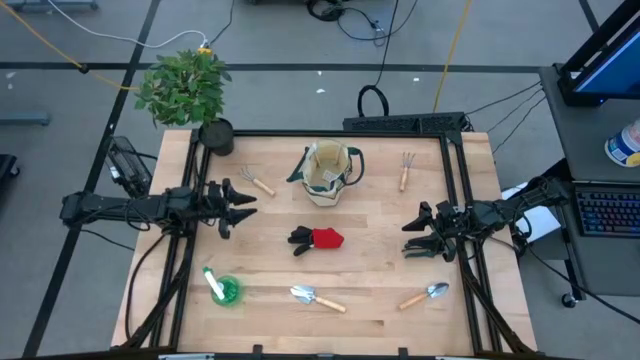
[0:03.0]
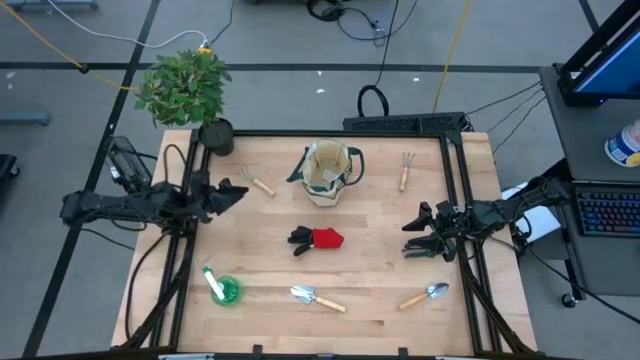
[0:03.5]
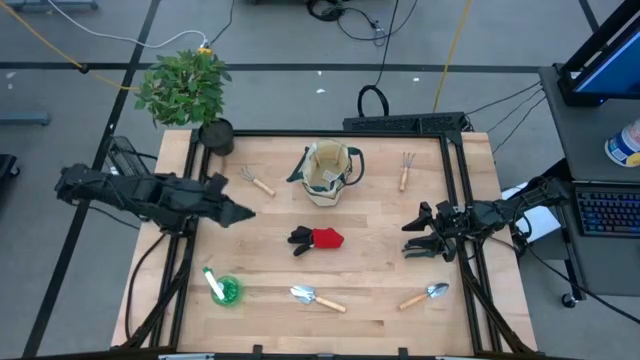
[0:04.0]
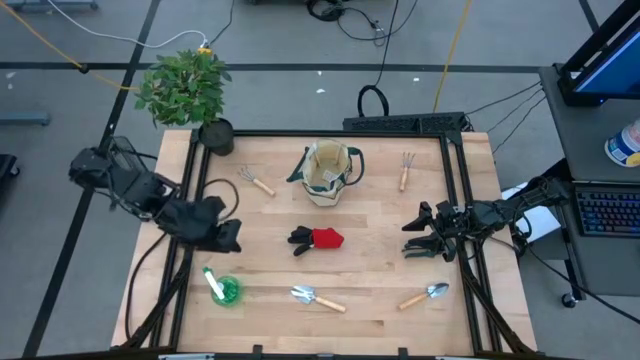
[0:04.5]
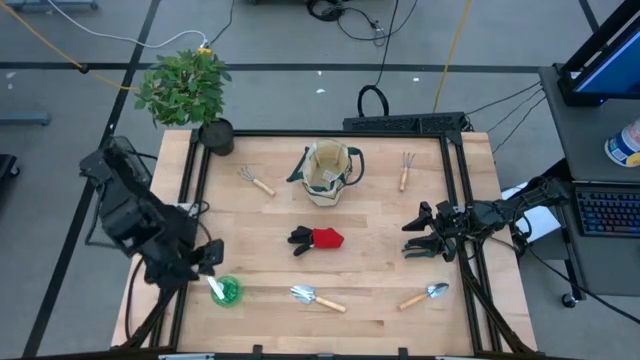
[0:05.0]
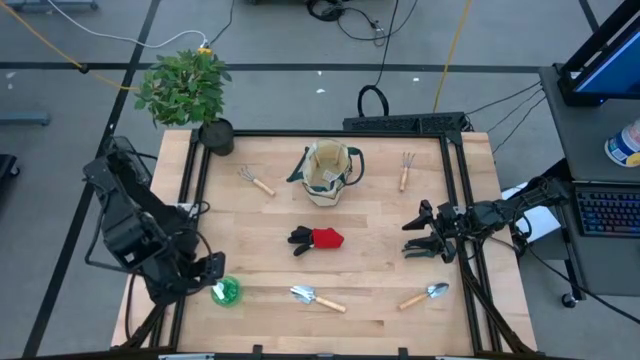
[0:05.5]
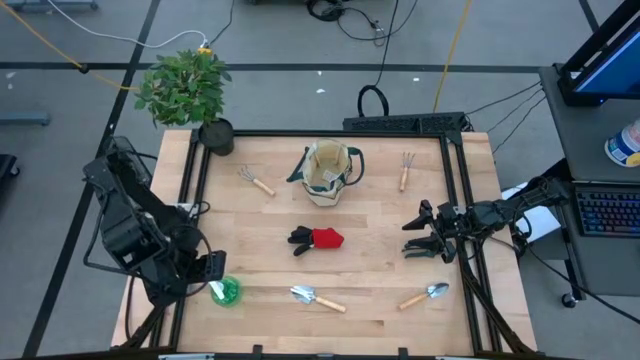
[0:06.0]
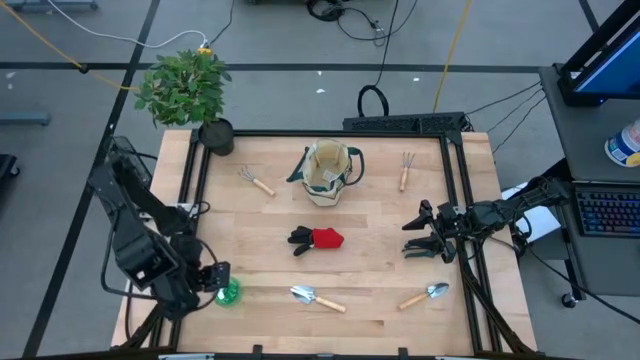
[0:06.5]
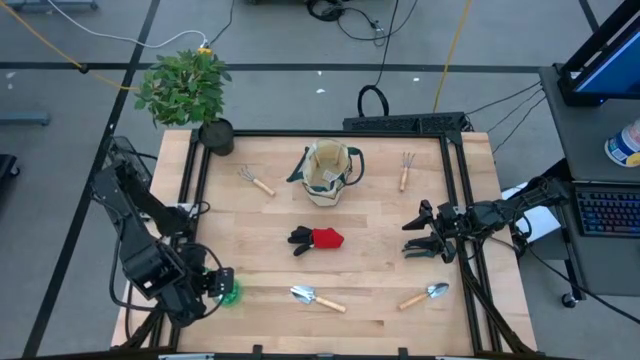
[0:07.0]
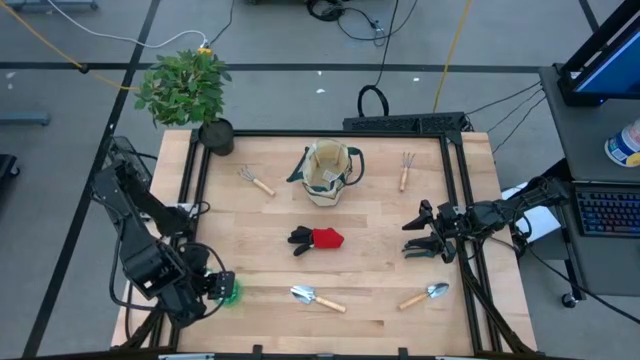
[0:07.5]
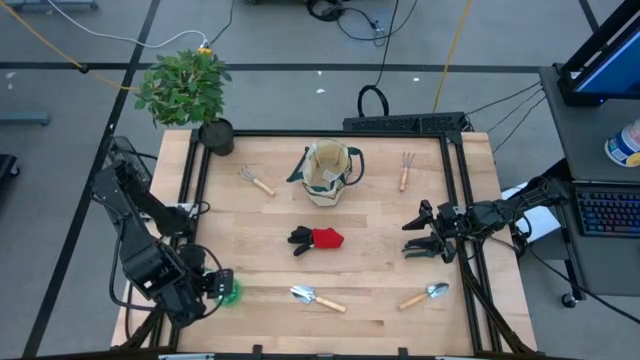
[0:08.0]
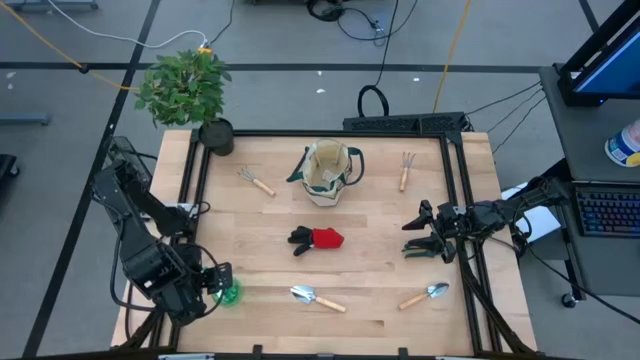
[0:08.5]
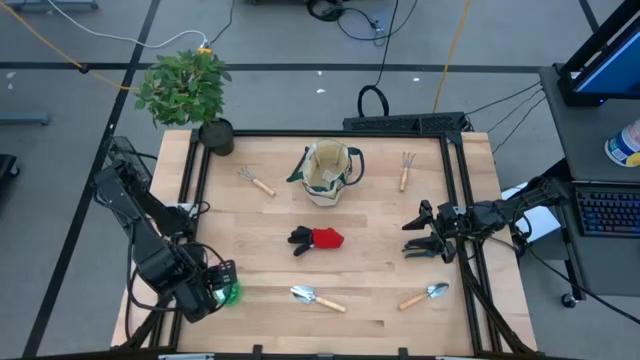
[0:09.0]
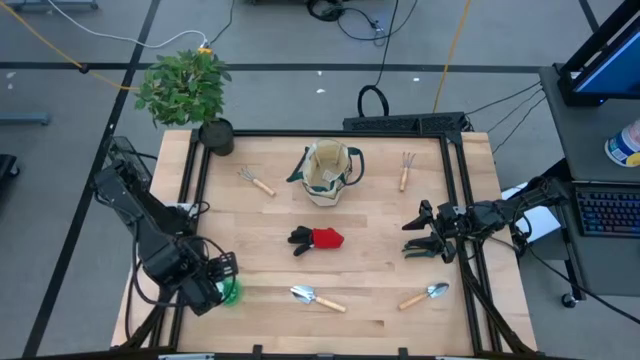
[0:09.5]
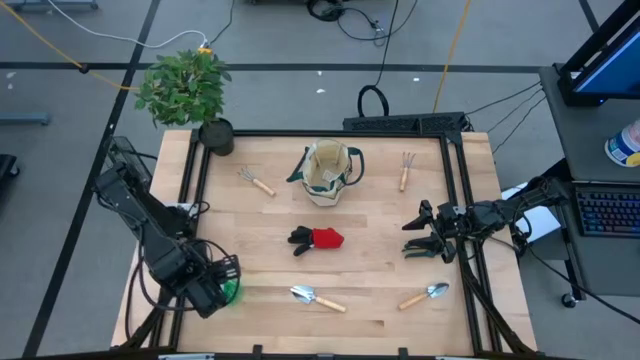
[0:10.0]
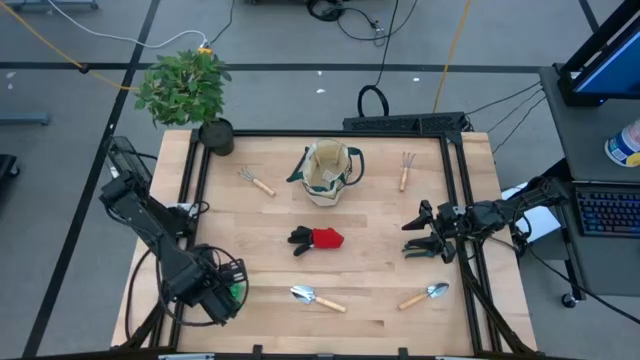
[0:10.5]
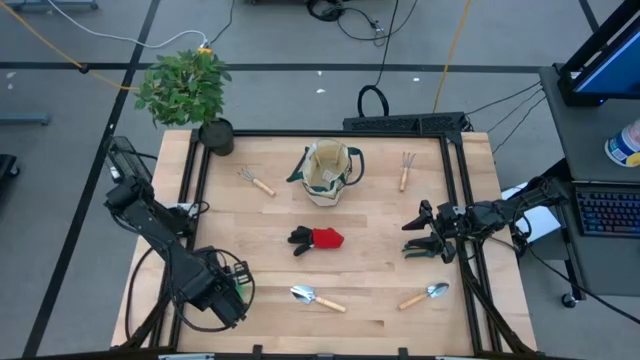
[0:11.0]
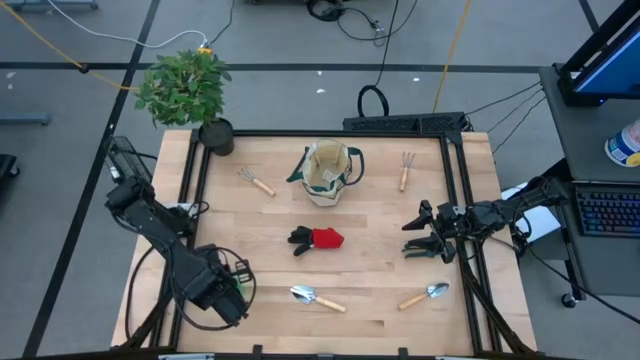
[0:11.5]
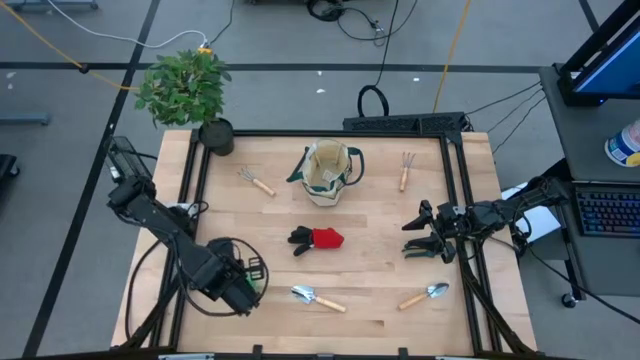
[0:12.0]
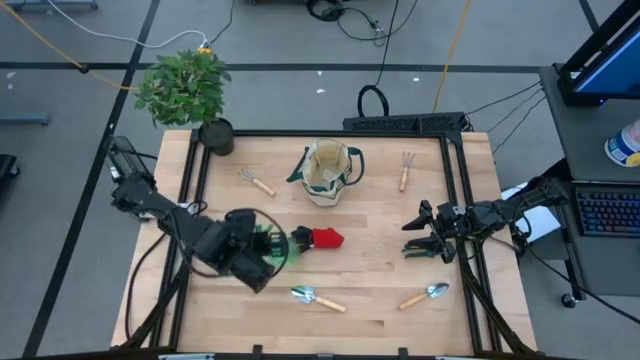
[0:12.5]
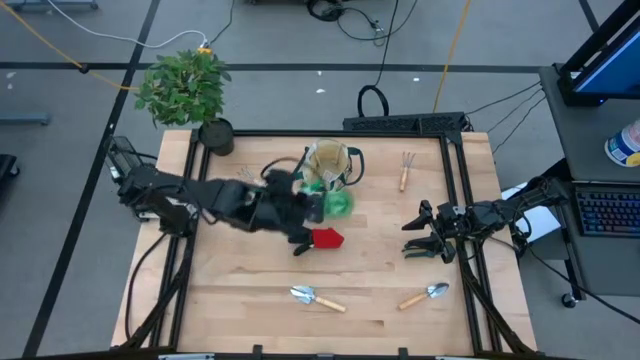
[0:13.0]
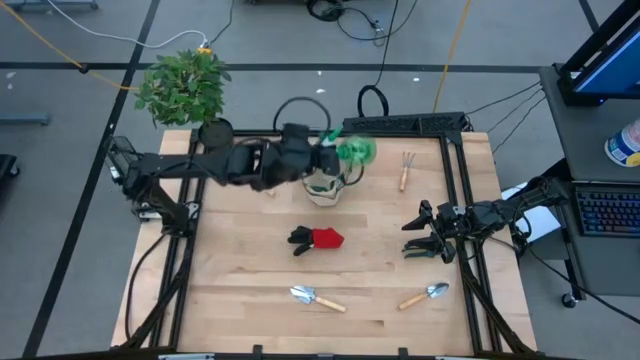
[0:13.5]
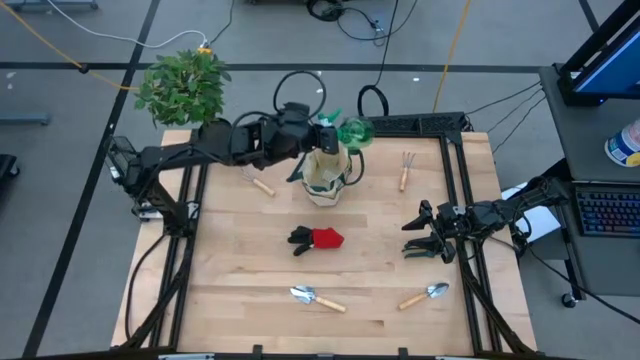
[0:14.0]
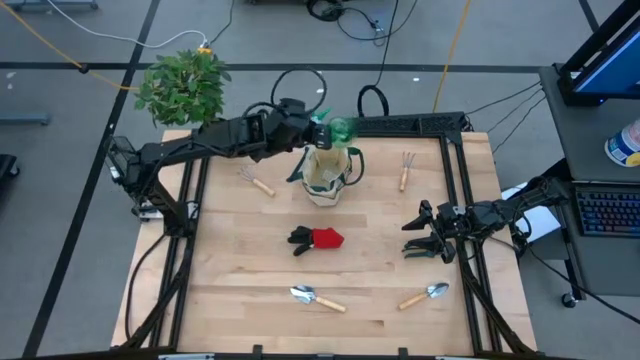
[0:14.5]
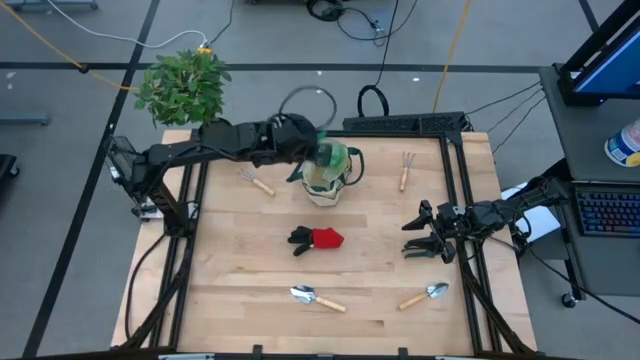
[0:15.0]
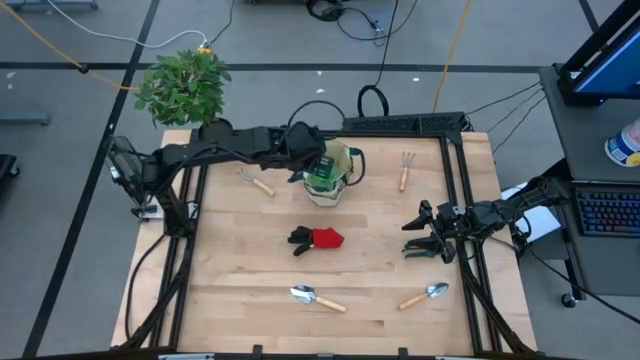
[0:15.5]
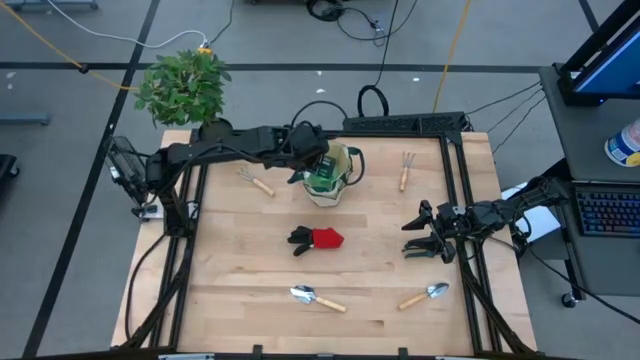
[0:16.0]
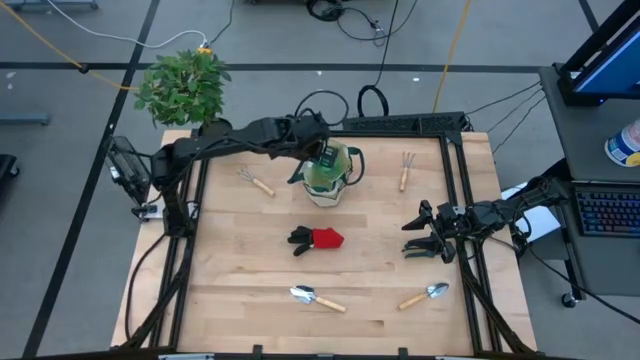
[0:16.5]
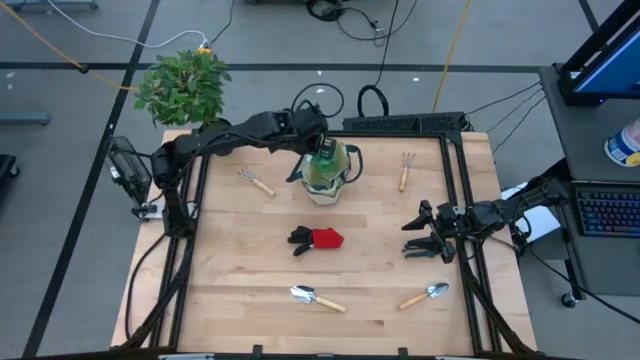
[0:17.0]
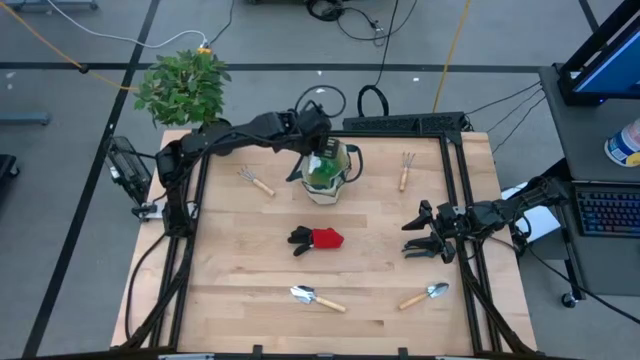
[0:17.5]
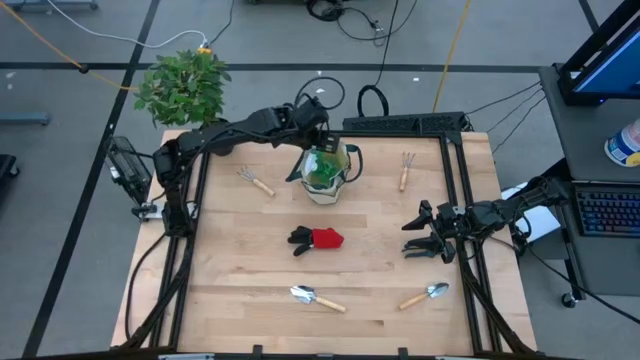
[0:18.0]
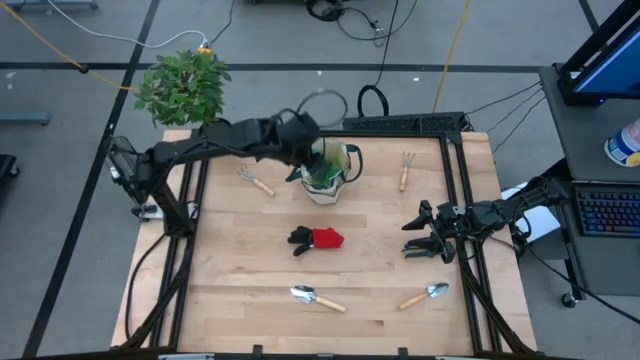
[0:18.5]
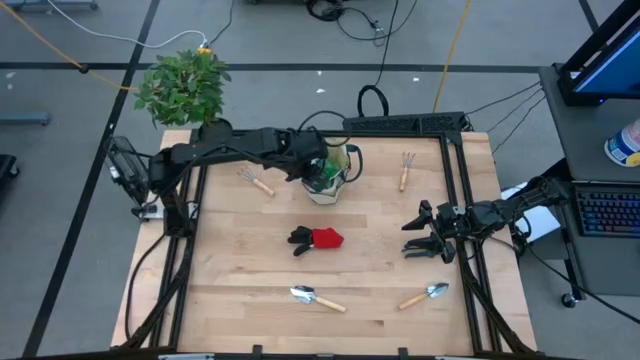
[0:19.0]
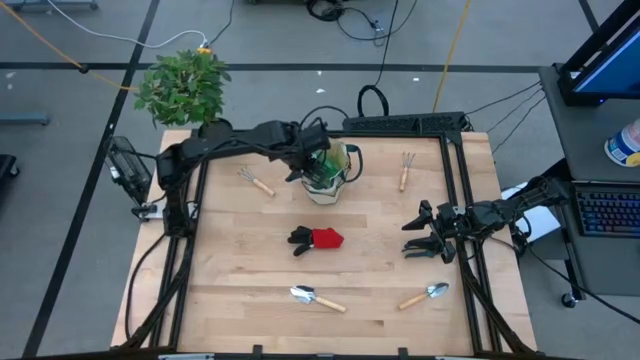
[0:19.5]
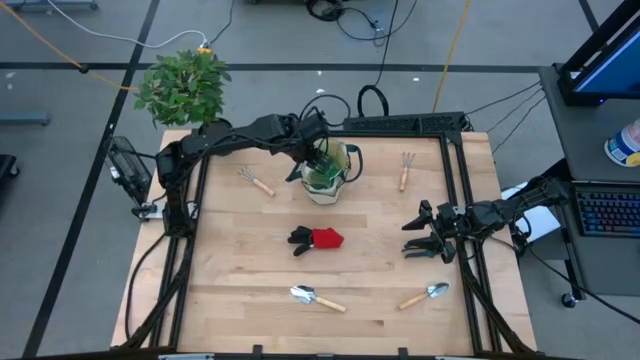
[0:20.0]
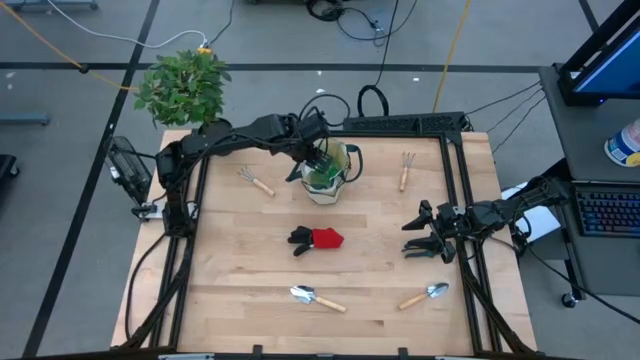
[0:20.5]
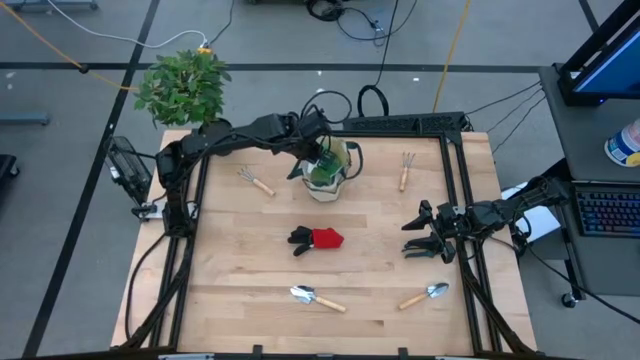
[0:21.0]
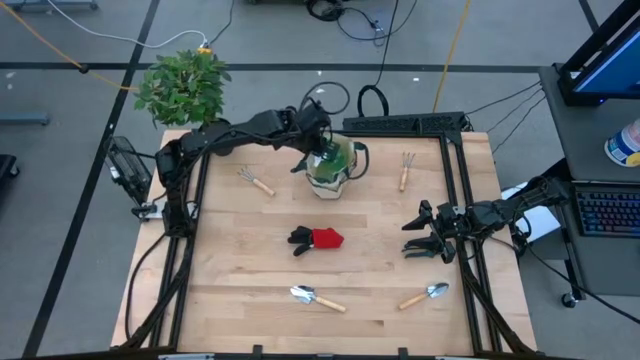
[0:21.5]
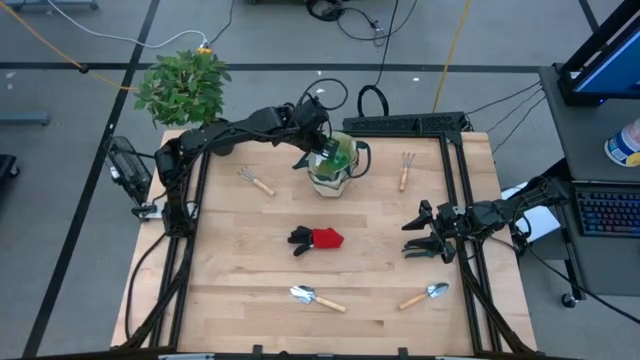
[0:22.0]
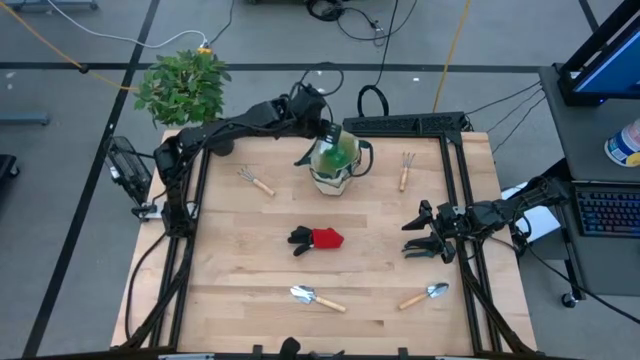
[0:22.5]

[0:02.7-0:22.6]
Task: Pick & Place Garden tools in Gardening bag
Put the spray bottle into the gardening tool bag
